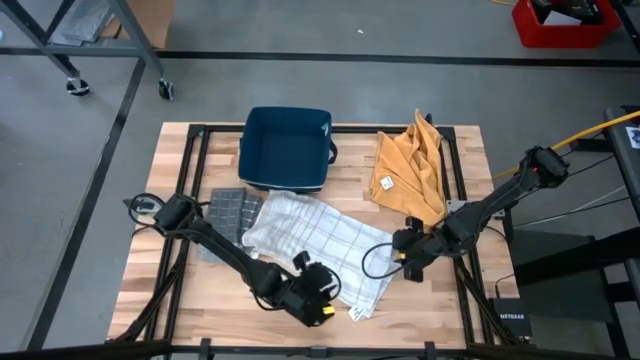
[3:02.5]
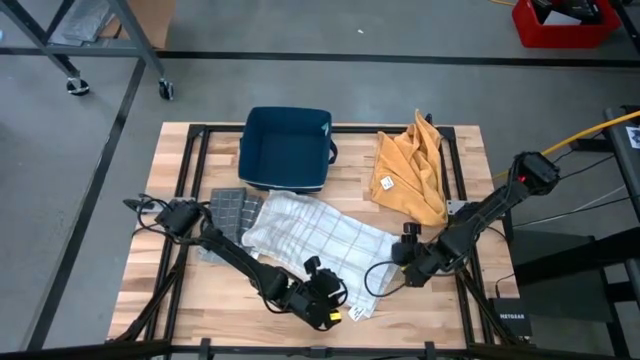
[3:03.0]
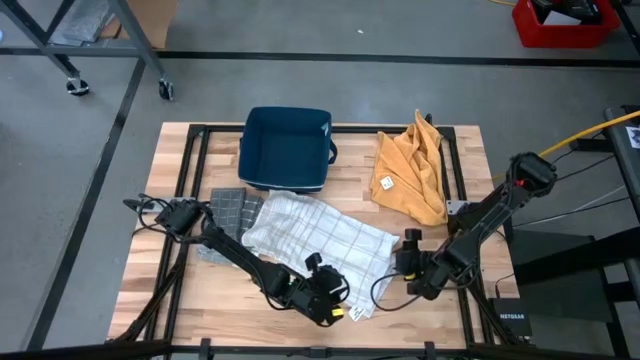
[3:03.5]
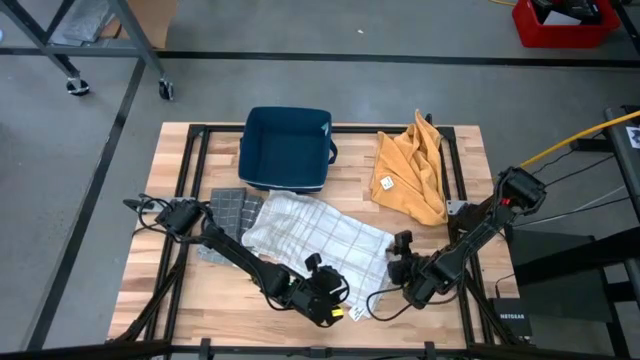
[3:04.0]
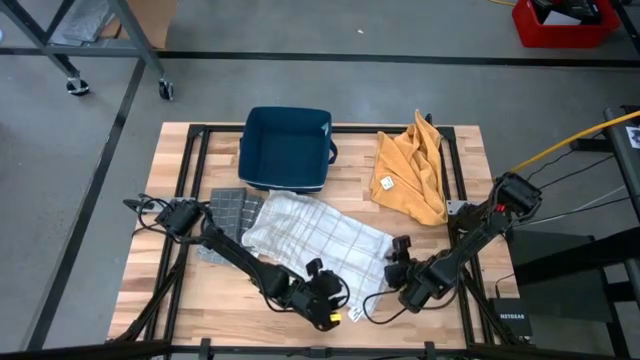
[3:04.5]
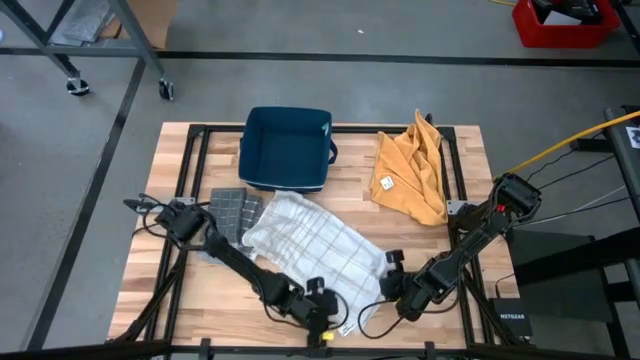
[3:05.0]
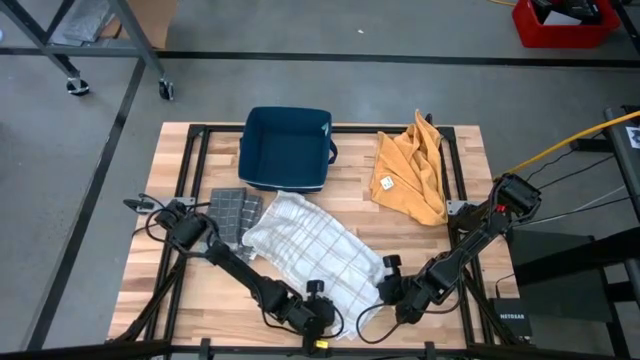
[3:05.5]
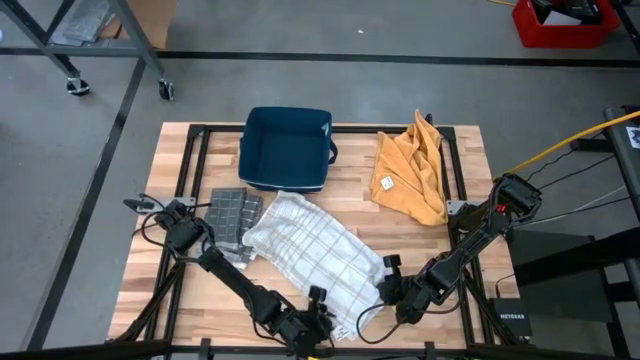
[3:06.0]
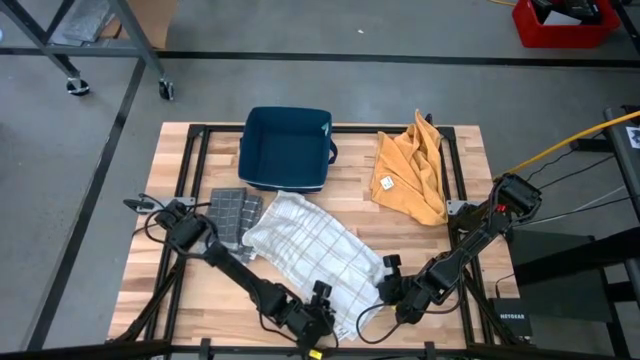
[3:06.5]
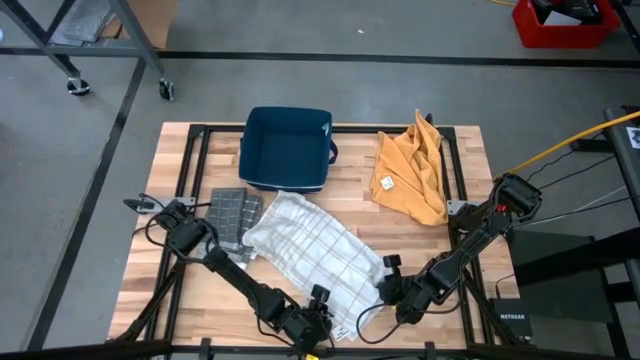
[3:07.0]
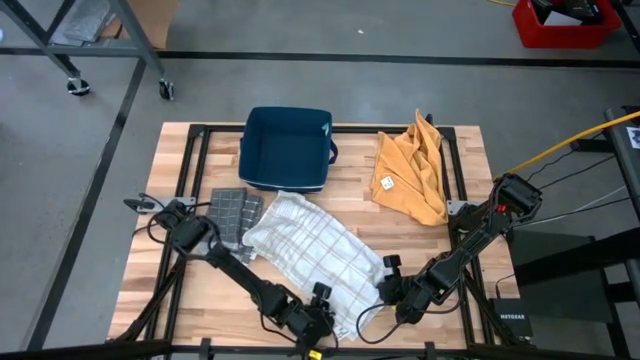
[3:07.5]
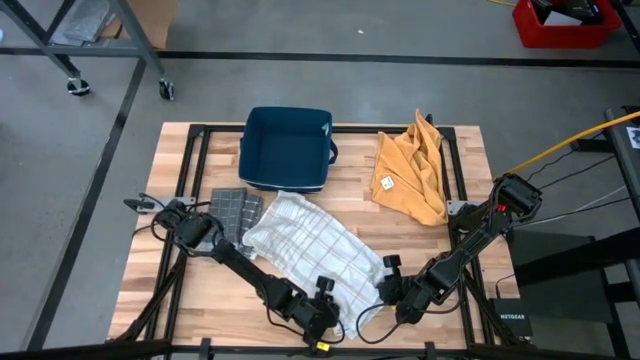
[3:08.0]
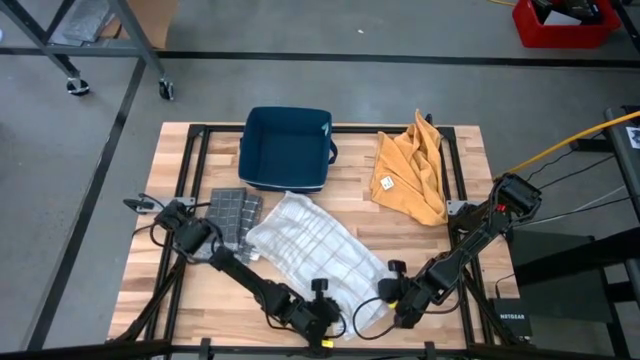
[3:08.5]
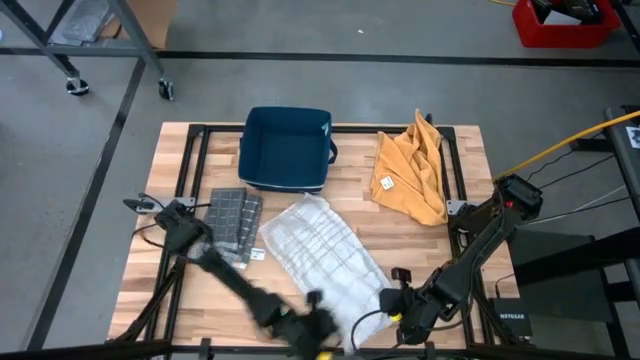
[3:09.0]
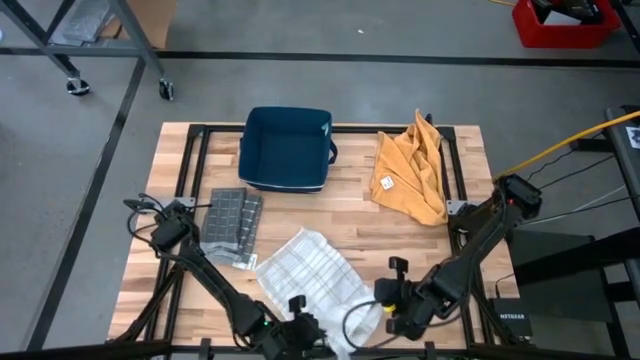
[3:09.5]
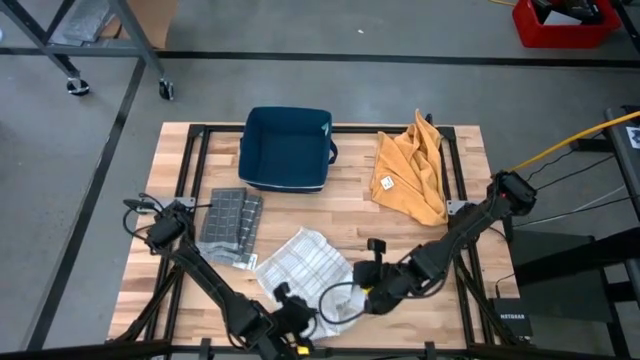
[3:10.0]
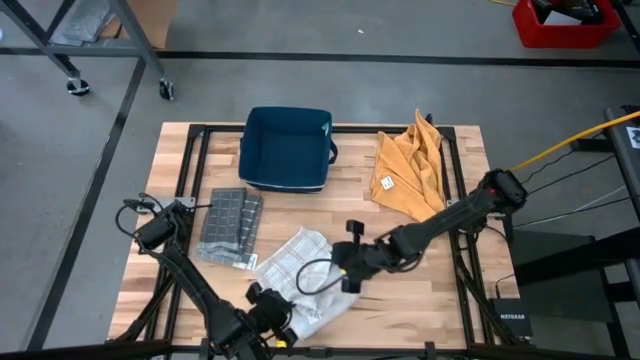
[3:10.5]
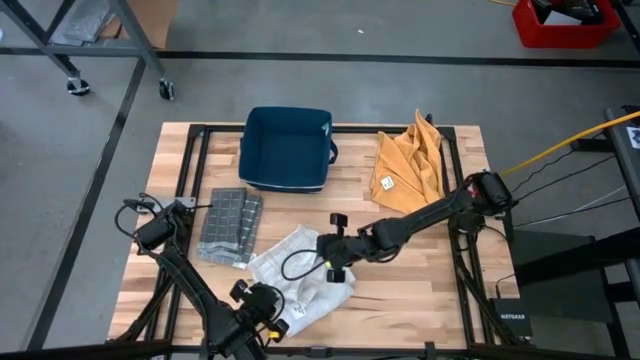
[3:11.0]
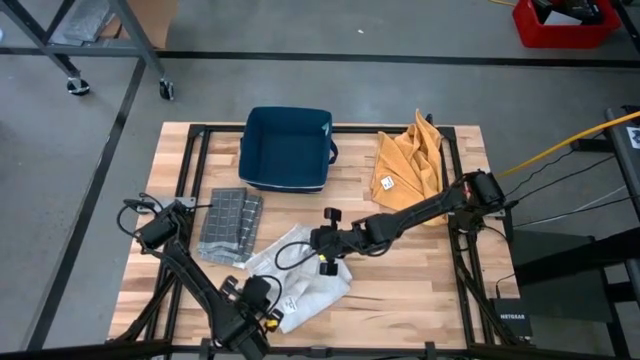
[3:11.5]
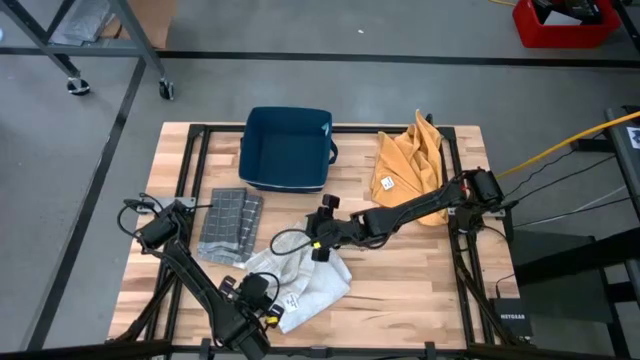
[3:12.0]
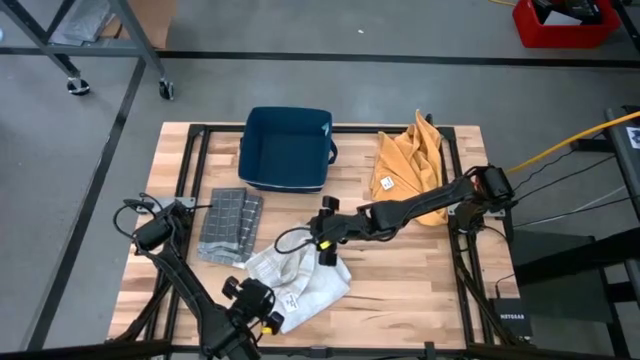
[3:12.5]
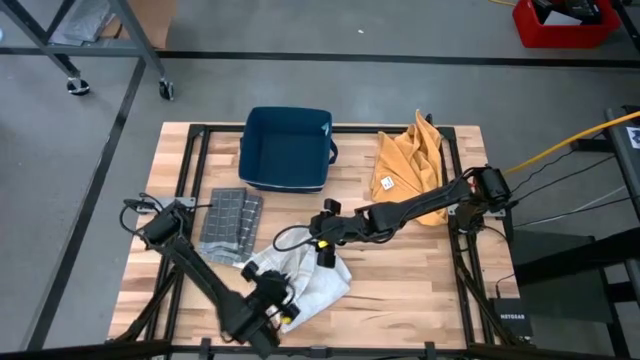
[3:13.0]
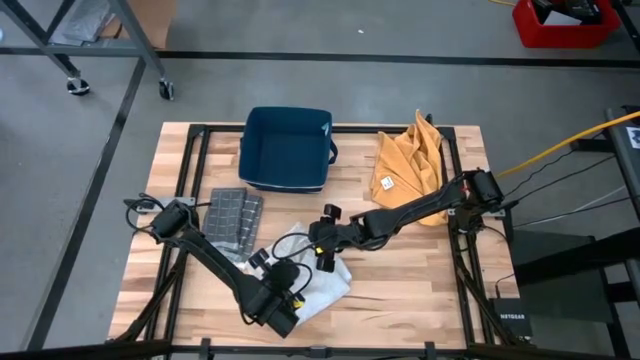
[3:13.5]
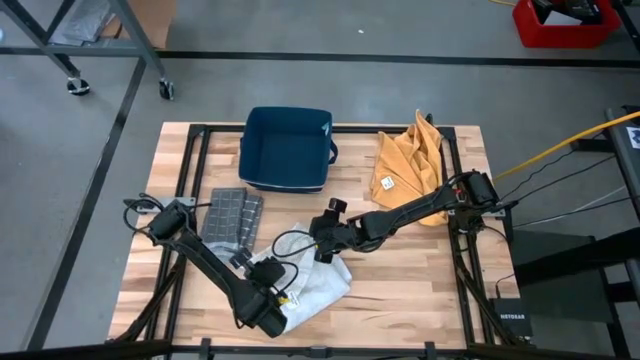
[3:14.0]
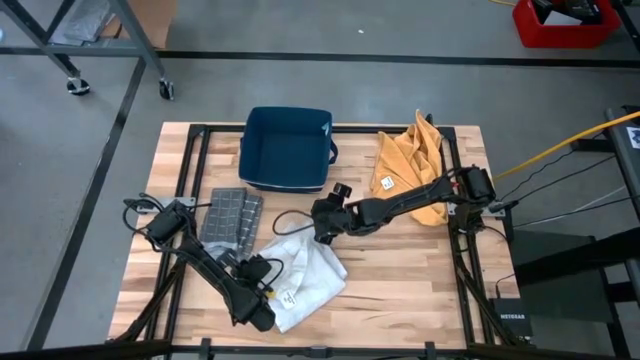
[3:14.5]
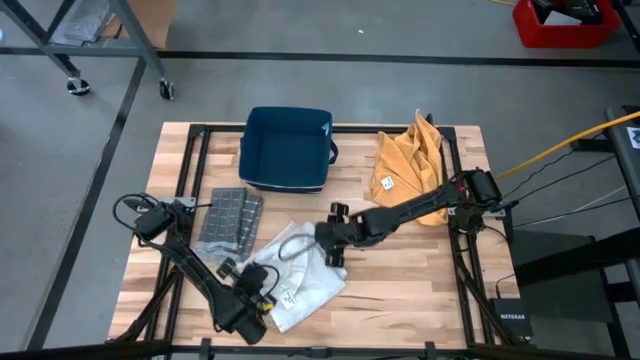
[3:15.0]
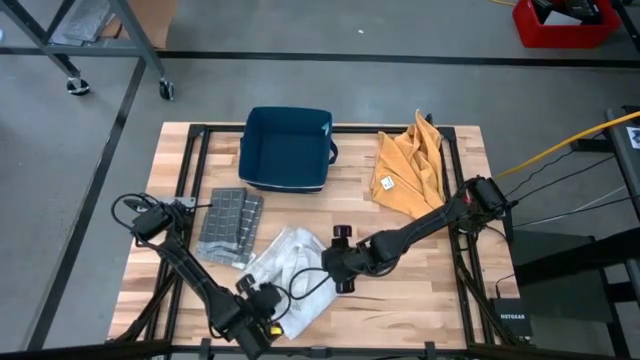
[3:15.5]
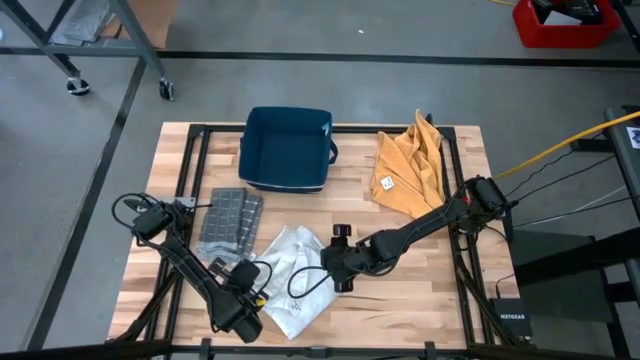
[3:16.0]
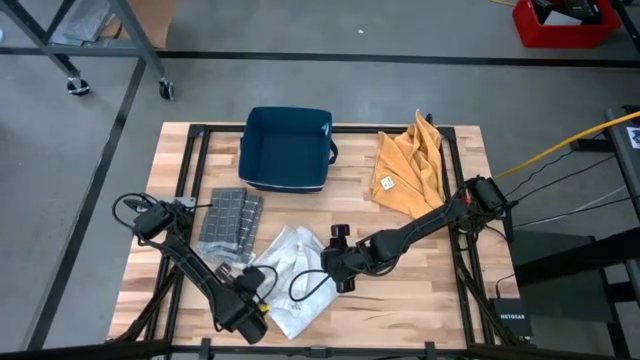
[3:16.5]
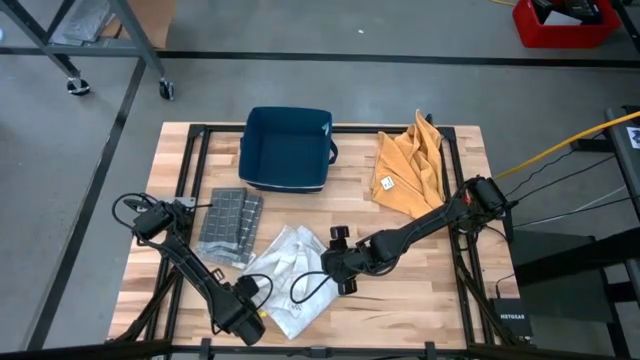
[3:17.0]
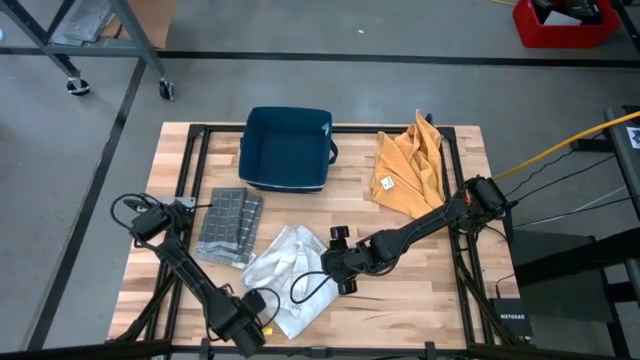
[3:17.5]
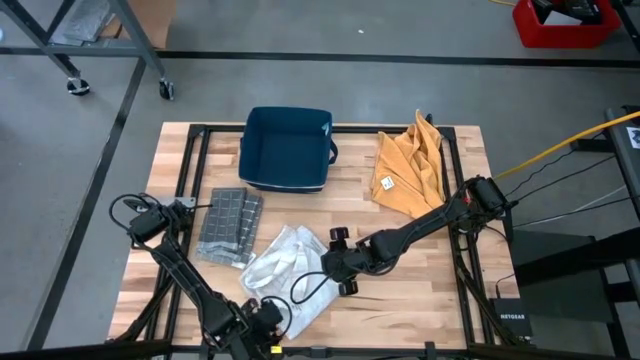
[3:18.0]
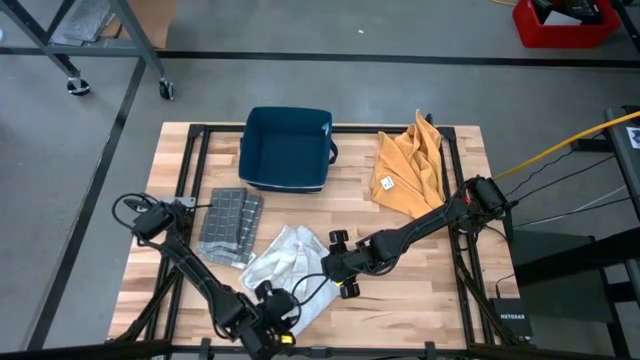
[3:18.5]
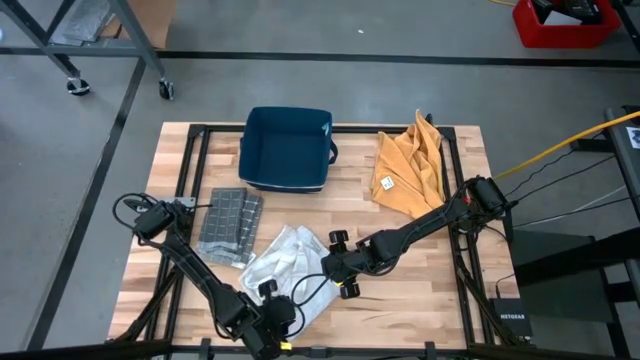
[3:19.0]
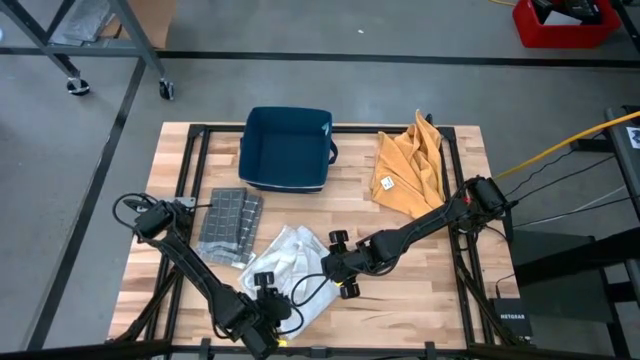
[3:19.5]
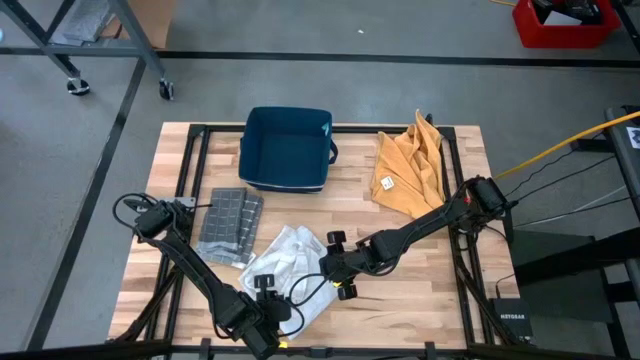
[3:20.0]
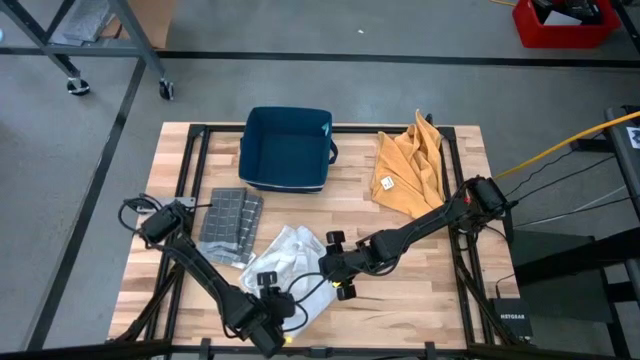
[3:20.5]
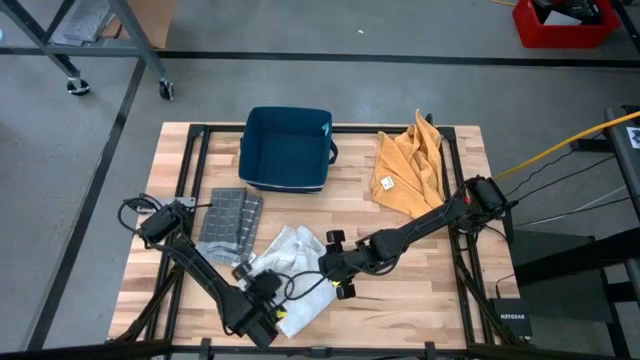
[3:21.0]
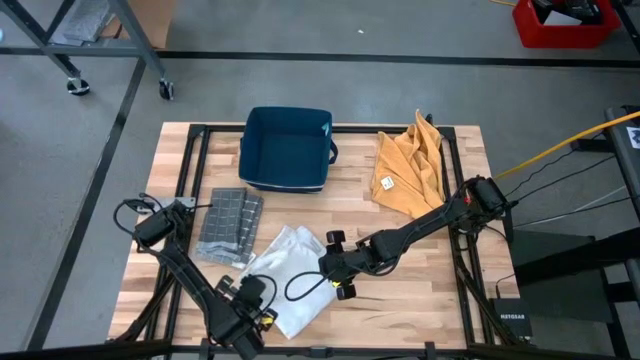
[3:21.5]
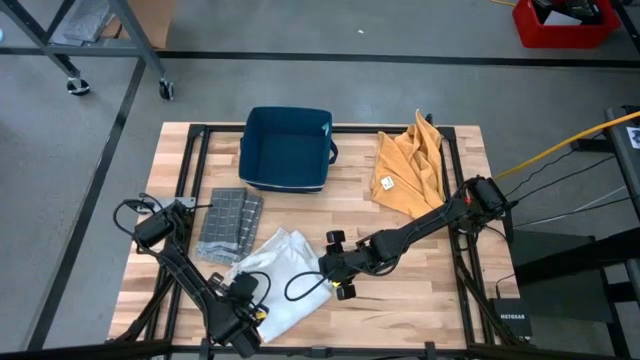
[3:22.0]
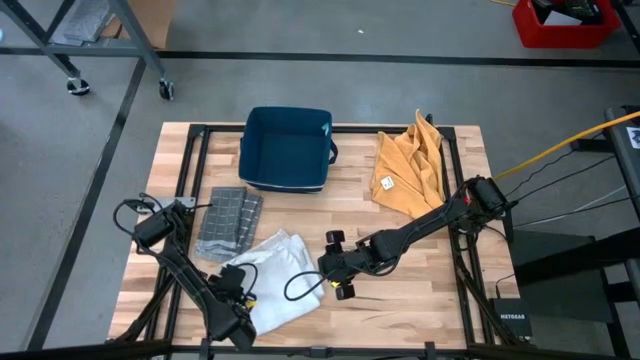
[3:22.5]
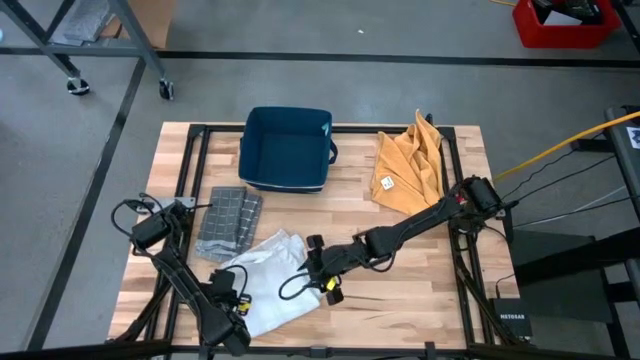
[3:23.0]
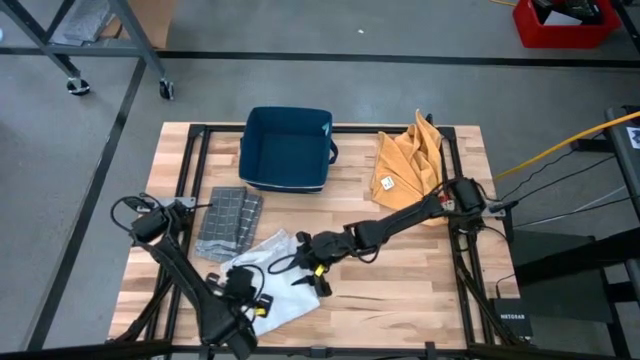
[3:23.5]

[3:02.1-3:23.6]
Task: Fold towel
Fold the white patterned towel
